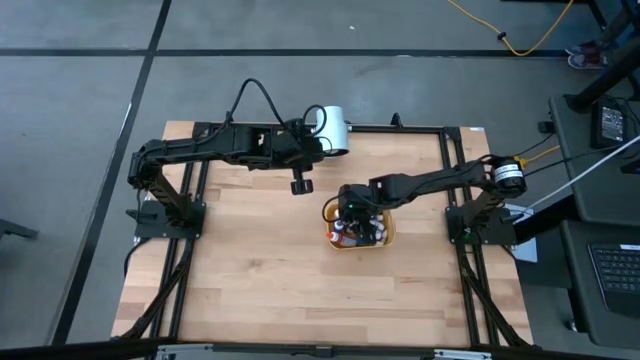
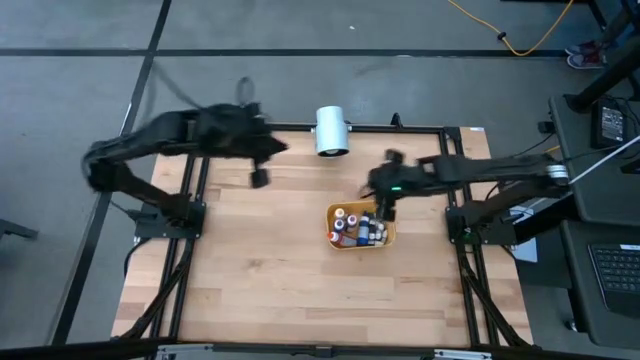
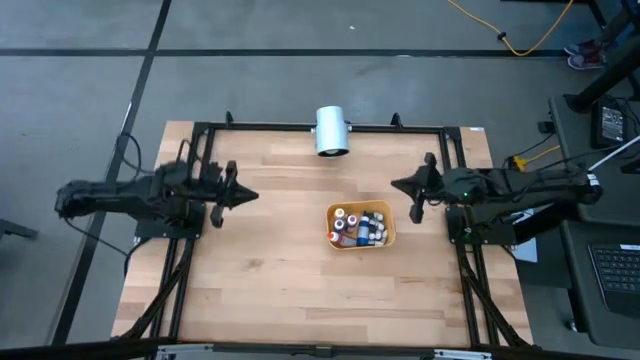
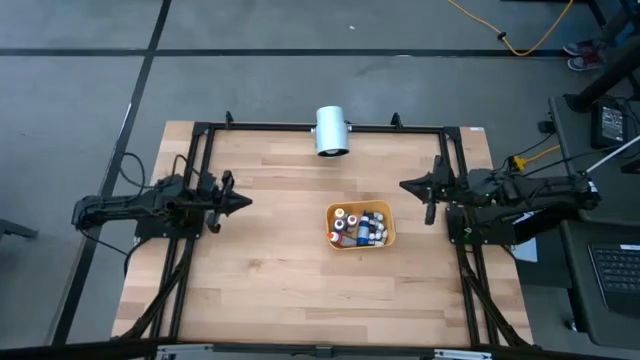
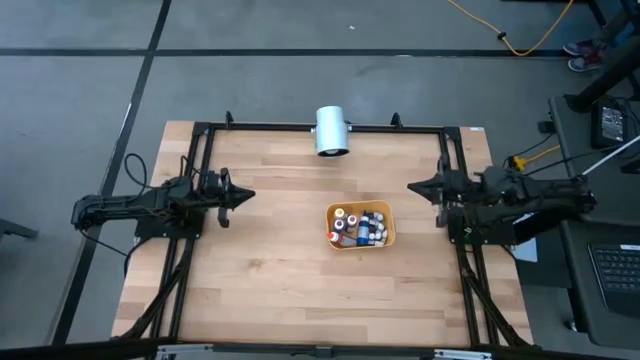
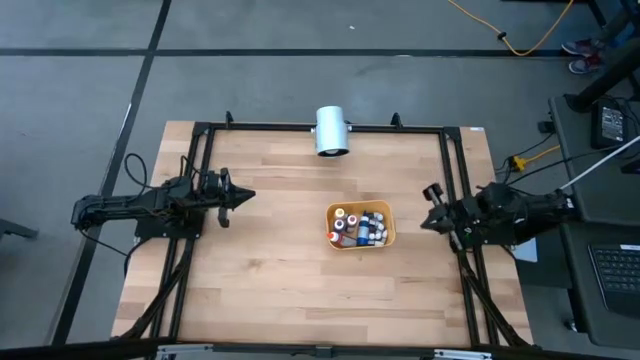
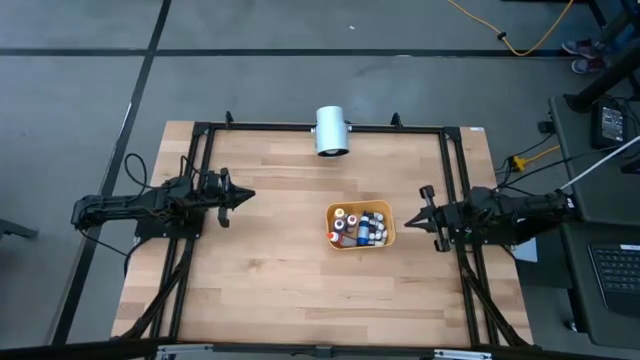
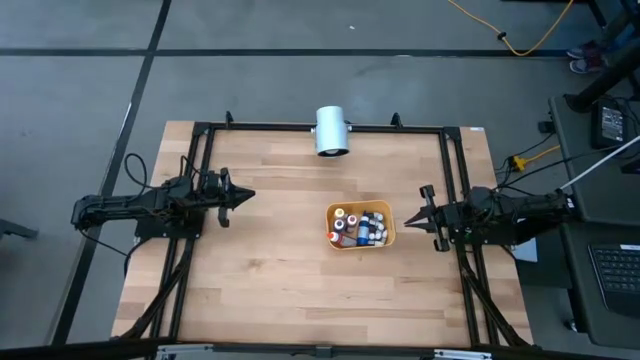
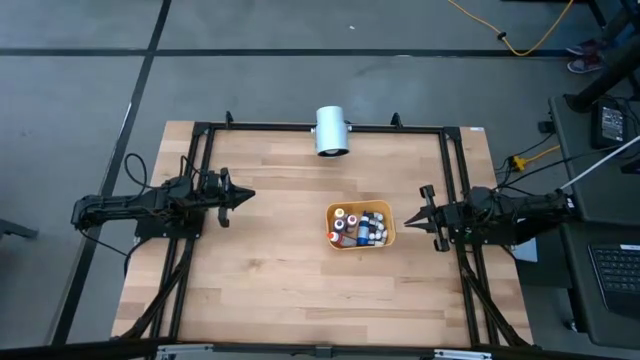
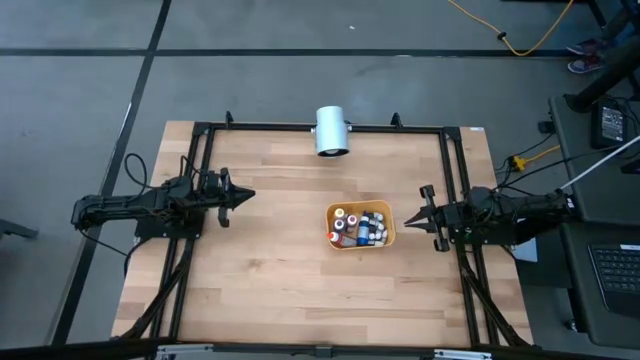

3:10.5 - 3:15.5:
Task: Pick & Place food coloring
Return to Home Position

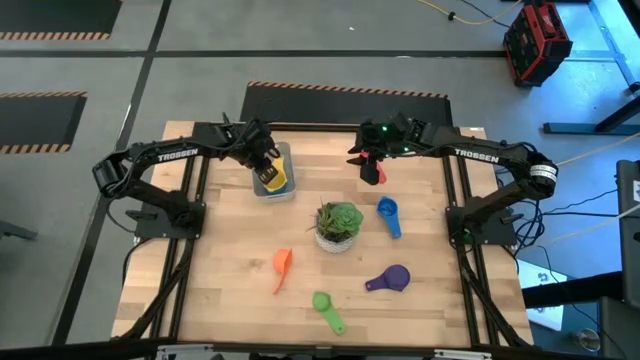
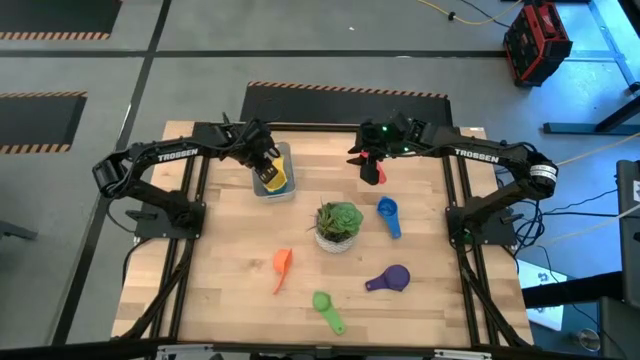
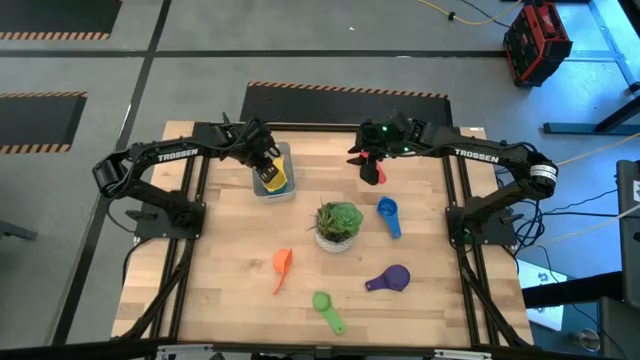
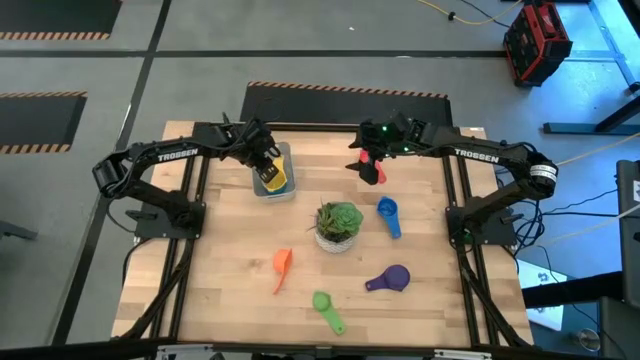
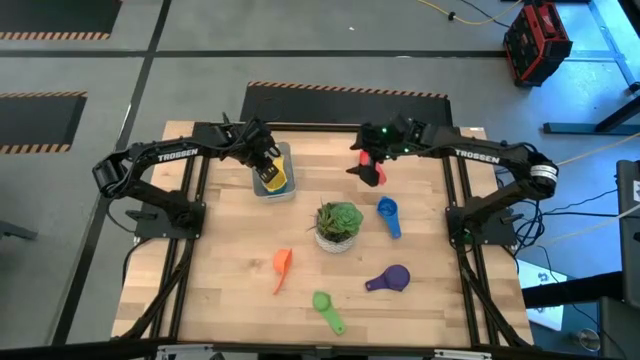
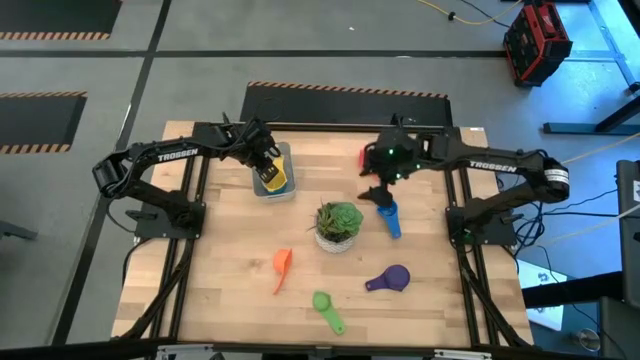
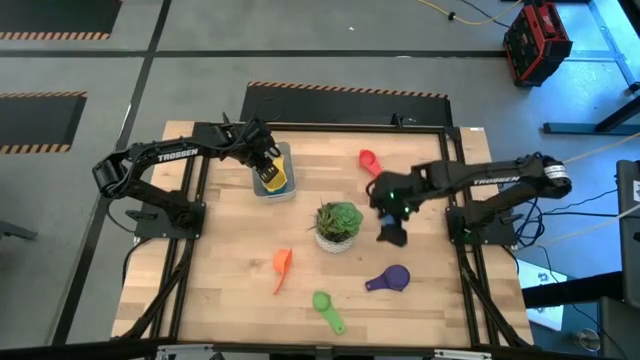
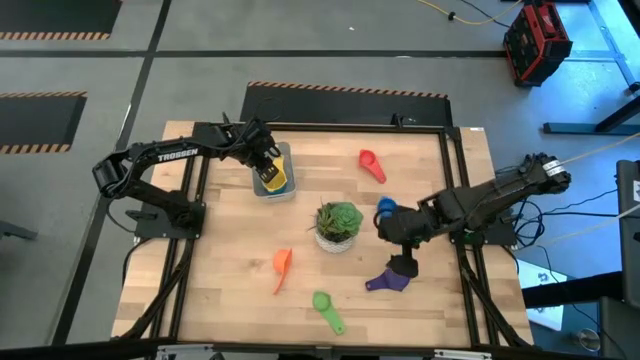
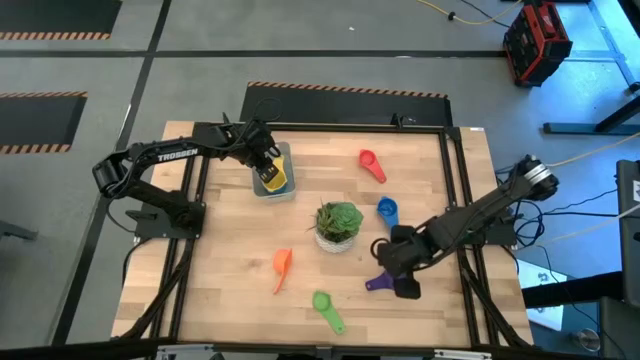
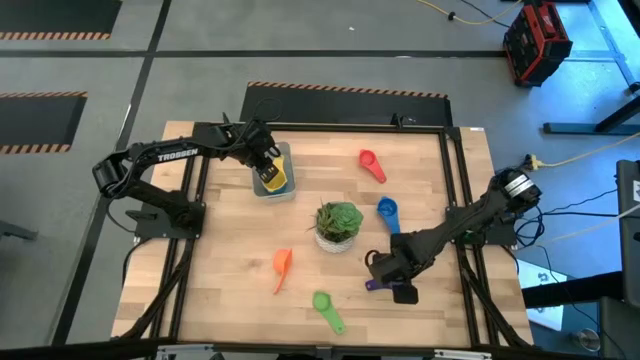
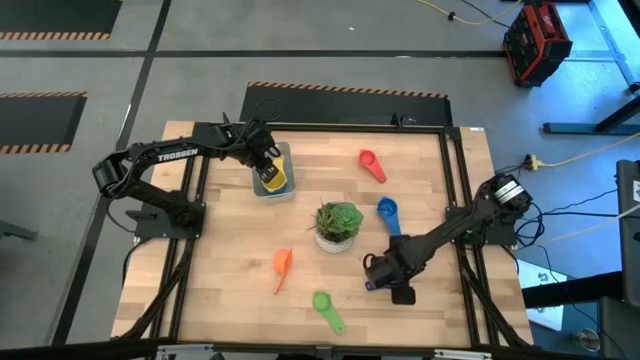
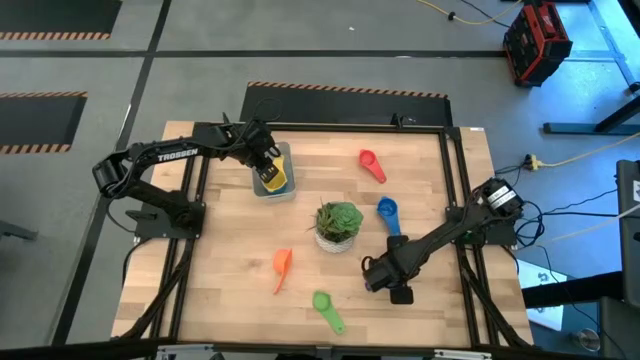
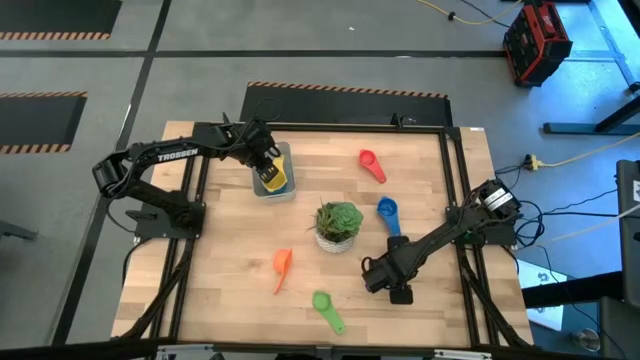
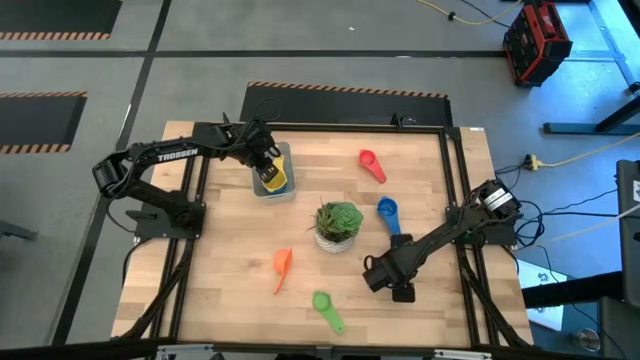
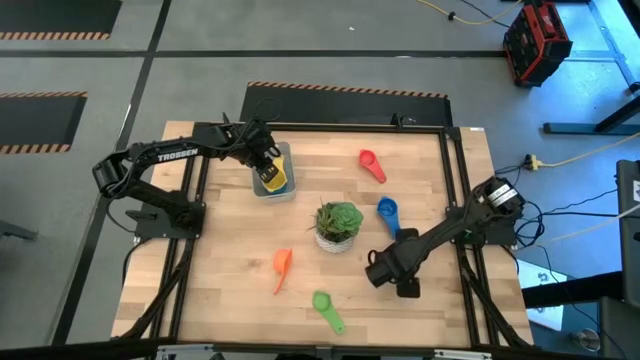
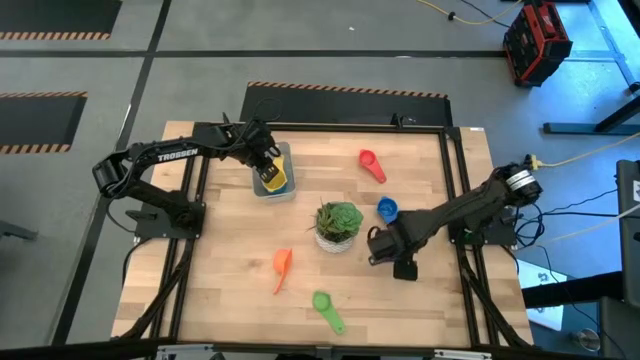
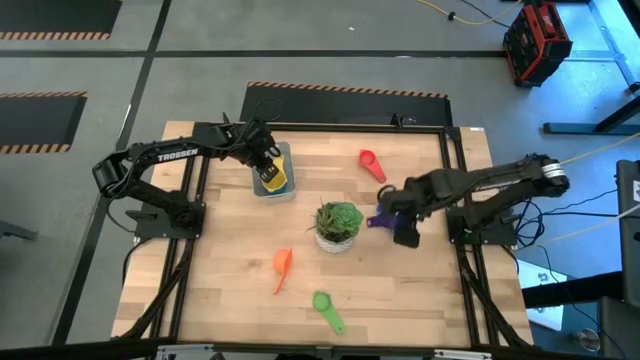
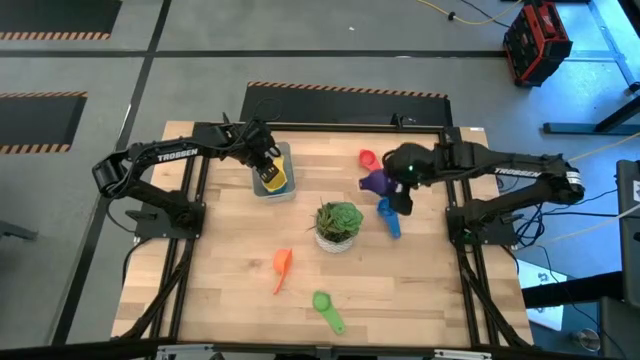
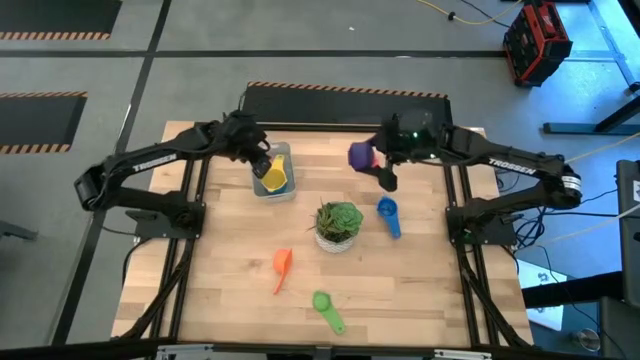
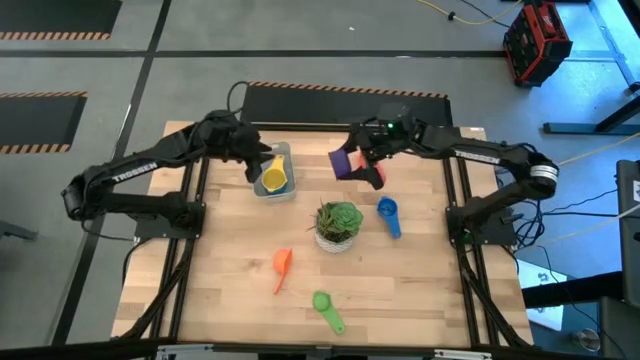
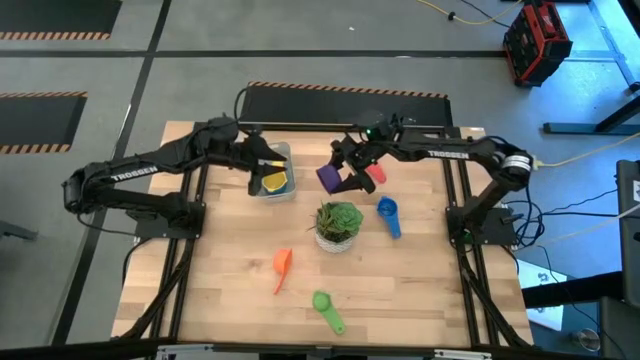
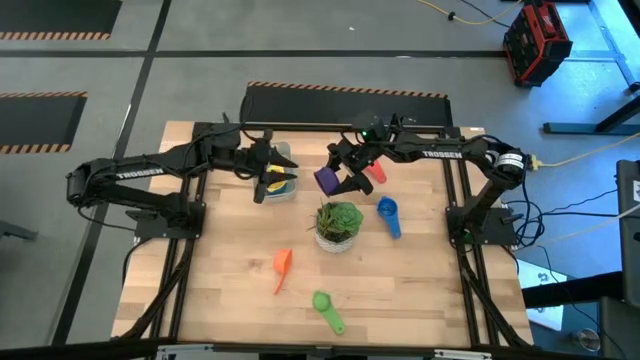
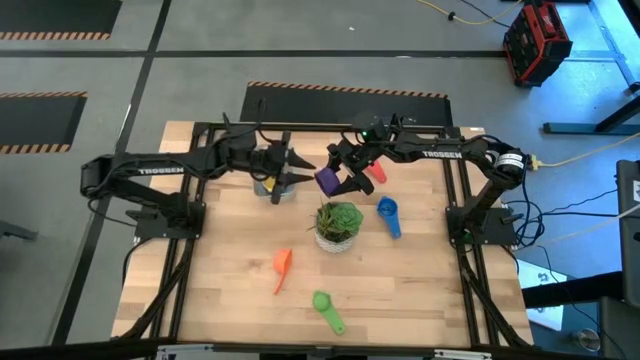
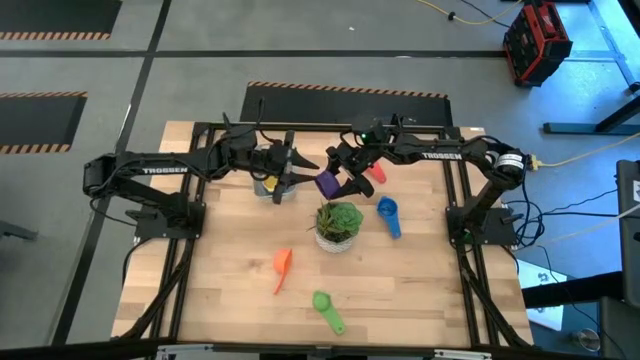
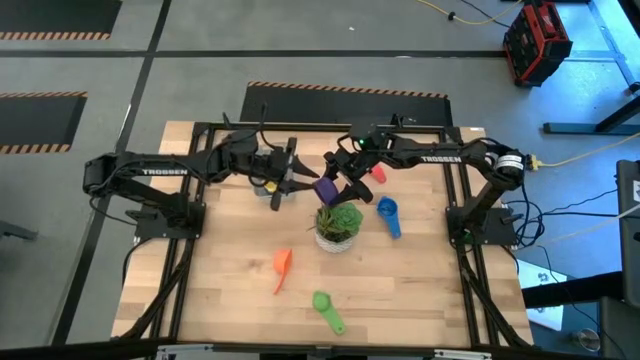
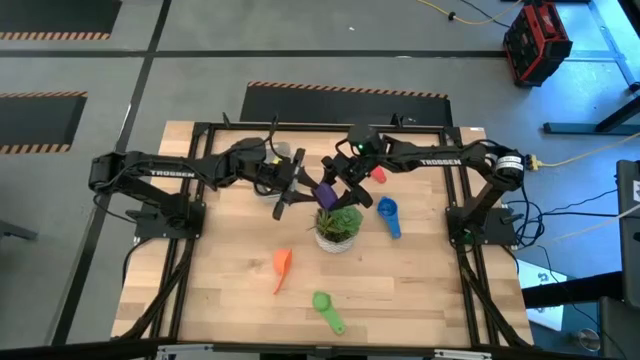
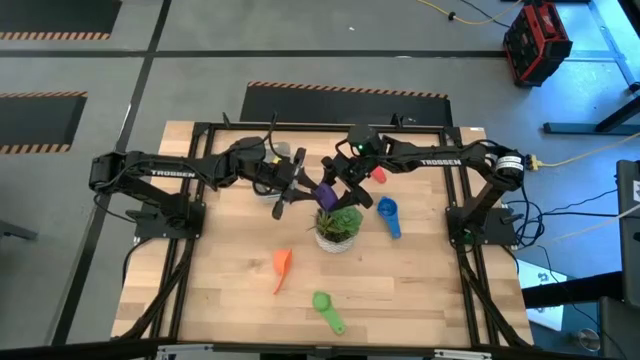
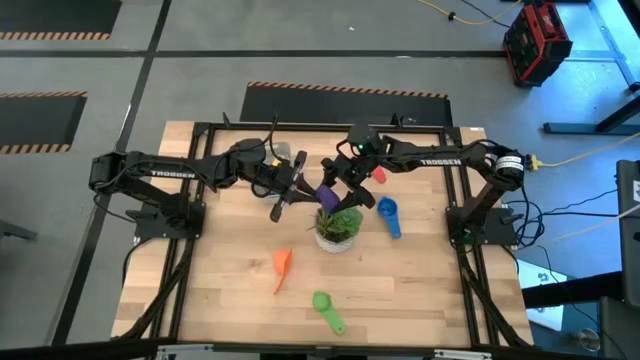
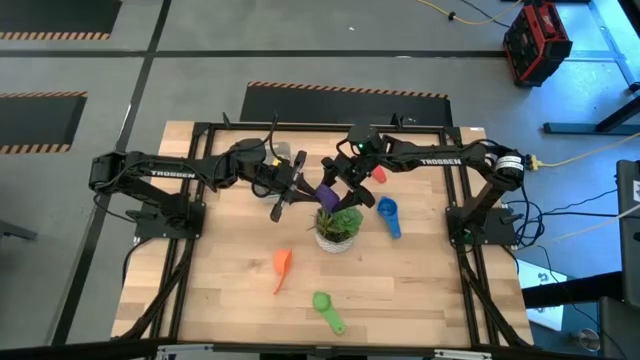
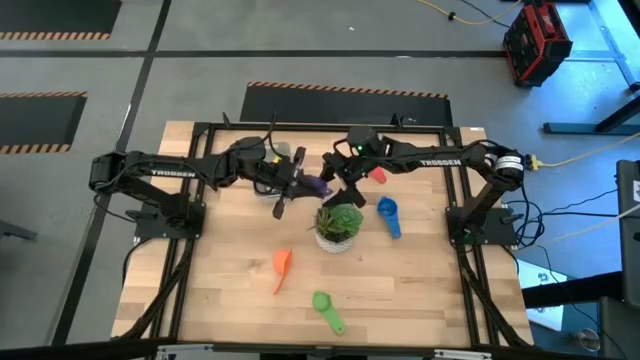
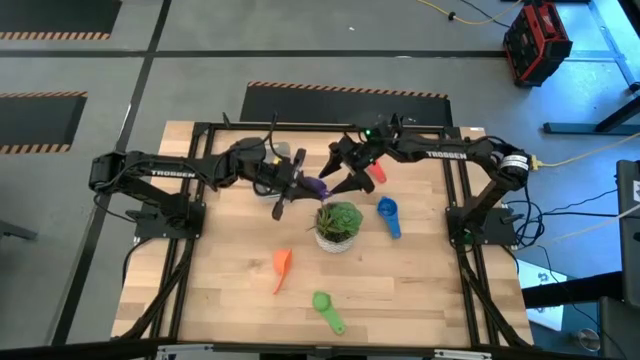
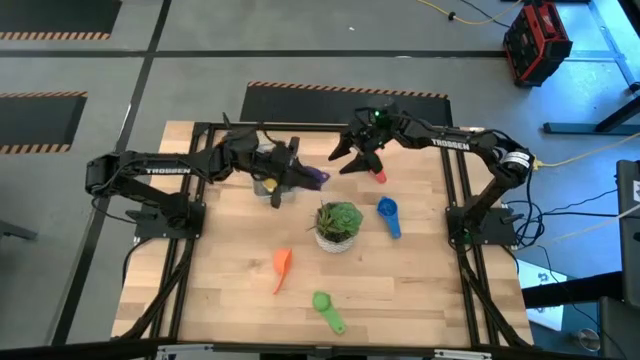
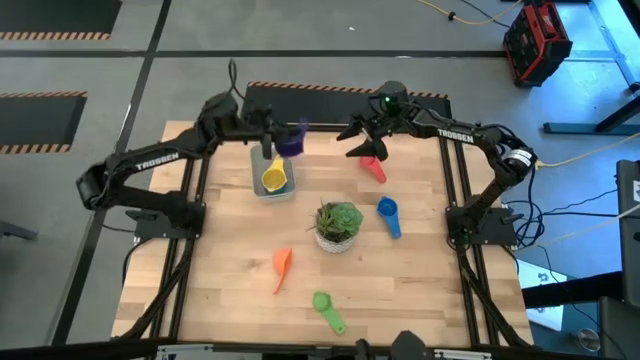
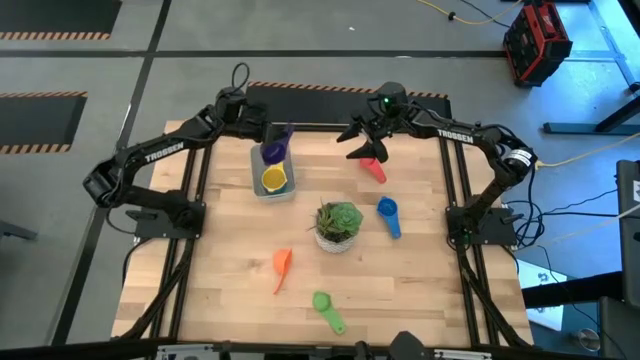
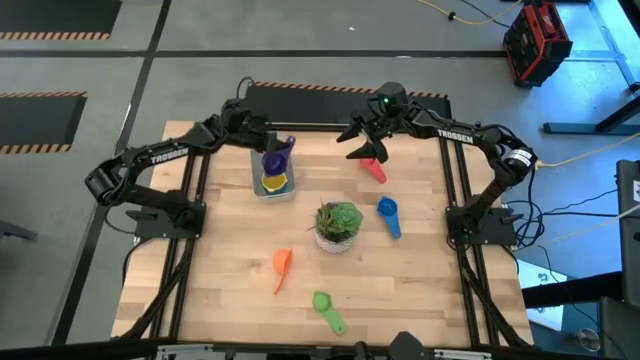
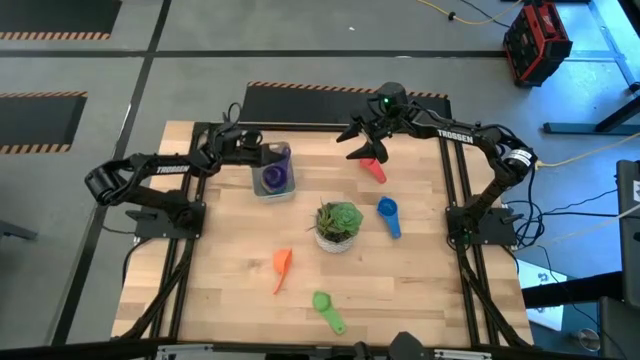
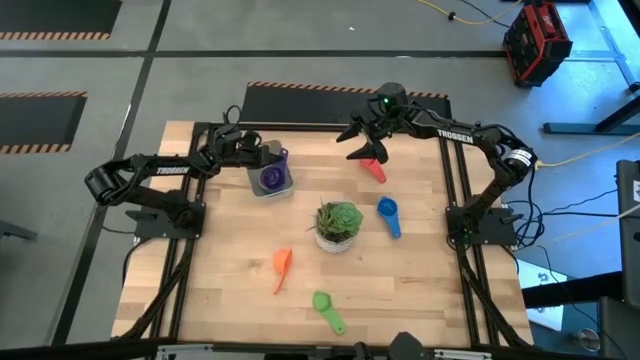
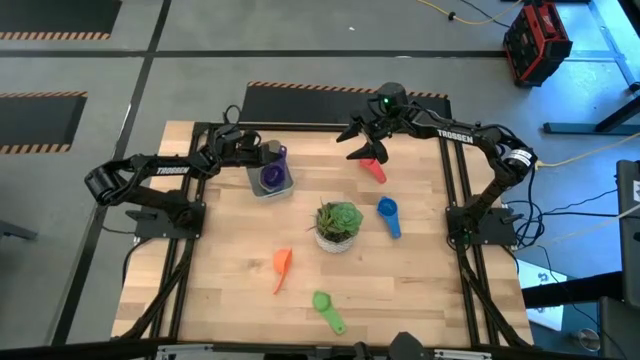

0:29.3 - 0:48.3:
Task: Nest measuring cups in basket
Stack the violet measuring cup on top of the yellow measuring cup in the gray bin
